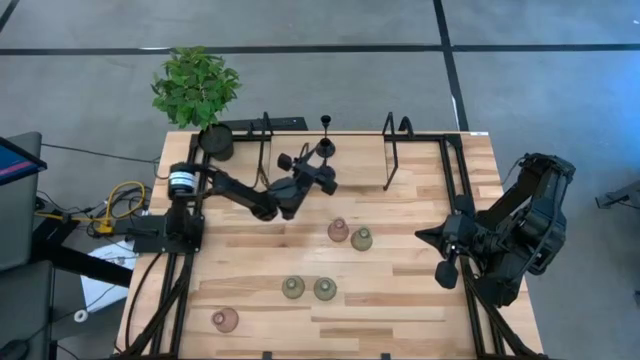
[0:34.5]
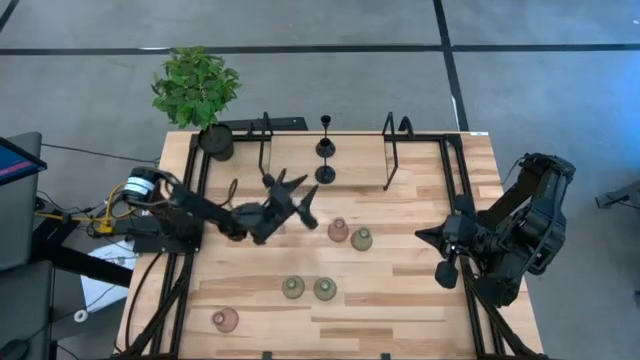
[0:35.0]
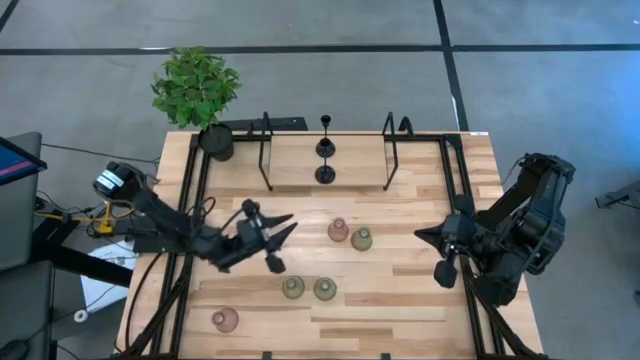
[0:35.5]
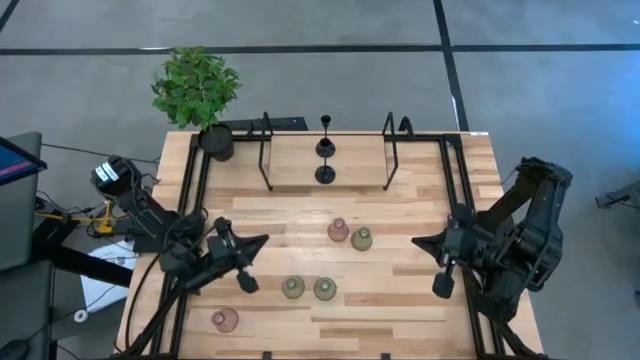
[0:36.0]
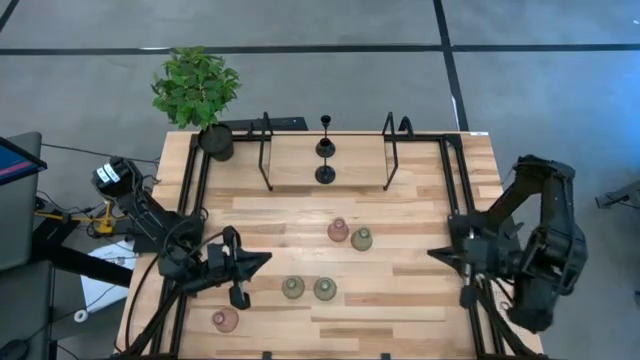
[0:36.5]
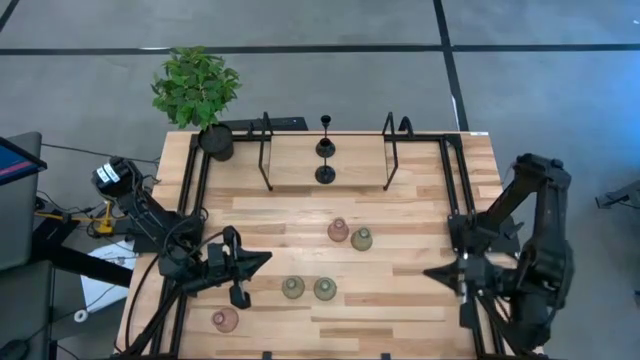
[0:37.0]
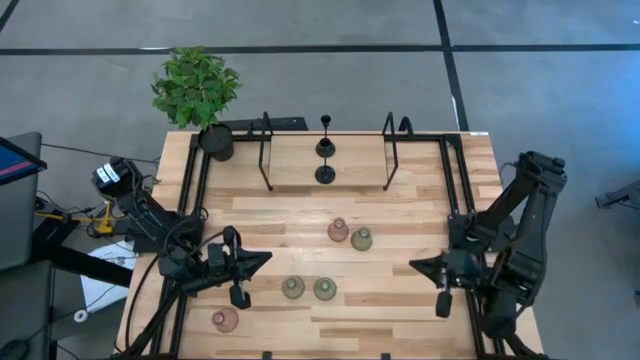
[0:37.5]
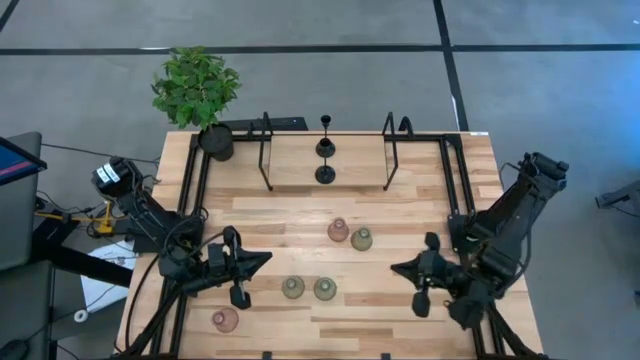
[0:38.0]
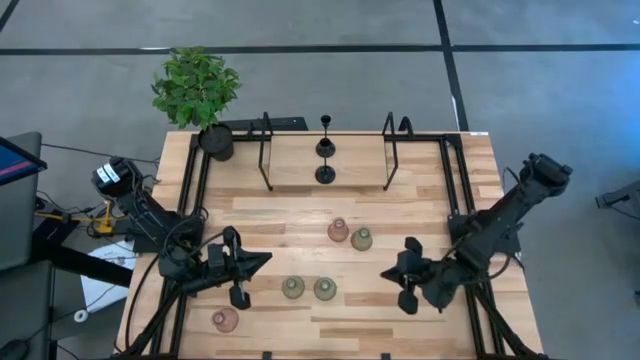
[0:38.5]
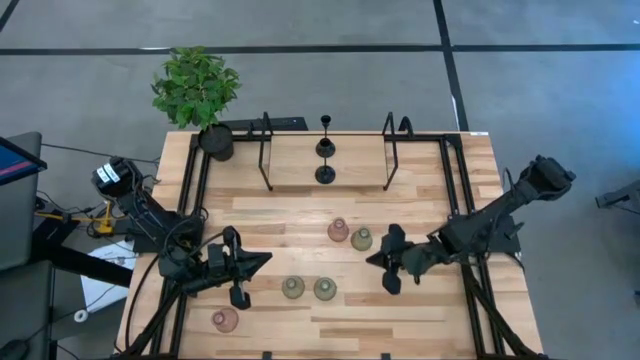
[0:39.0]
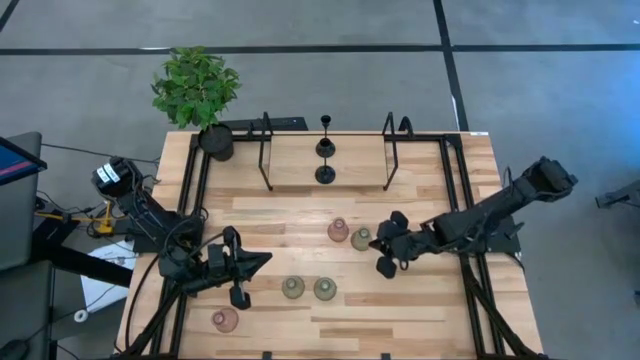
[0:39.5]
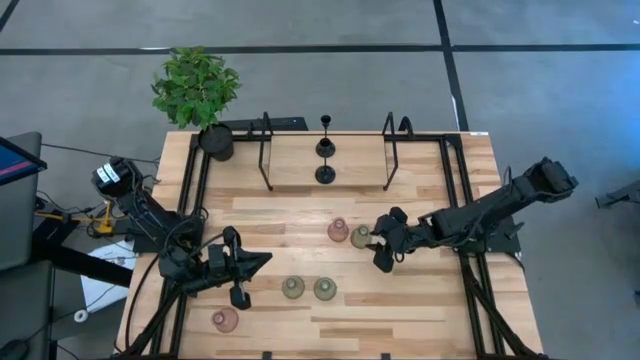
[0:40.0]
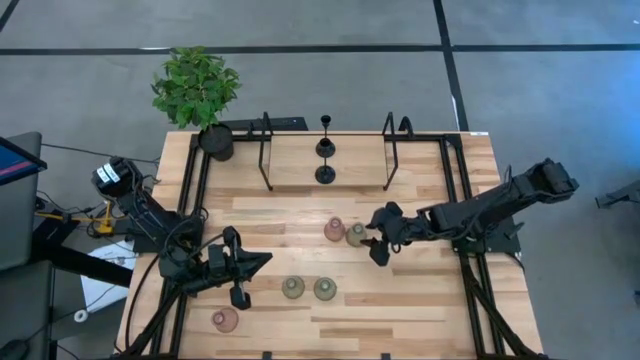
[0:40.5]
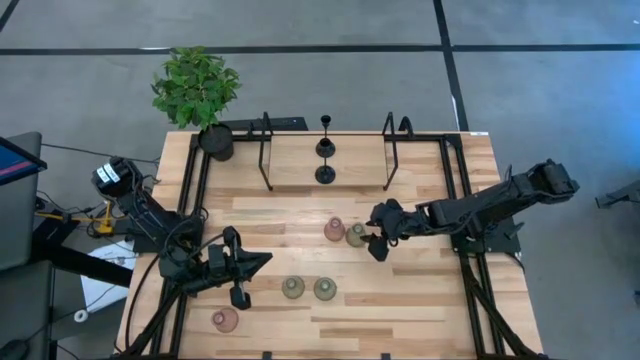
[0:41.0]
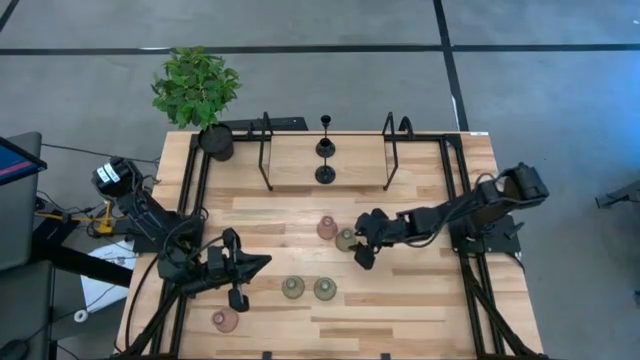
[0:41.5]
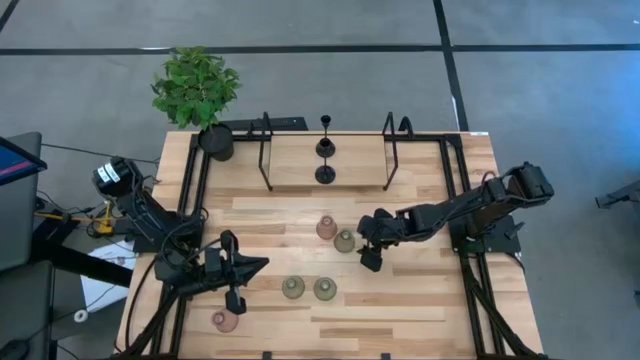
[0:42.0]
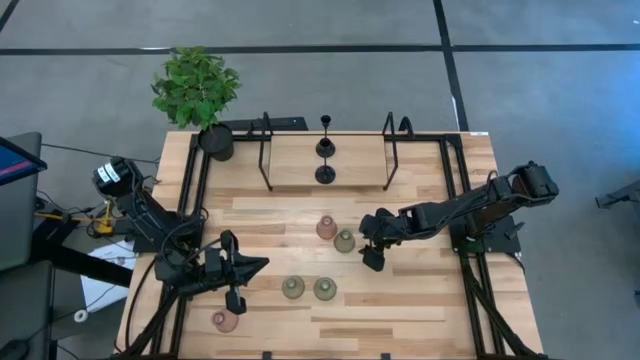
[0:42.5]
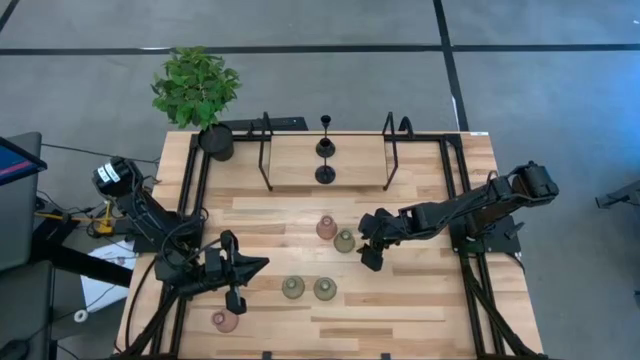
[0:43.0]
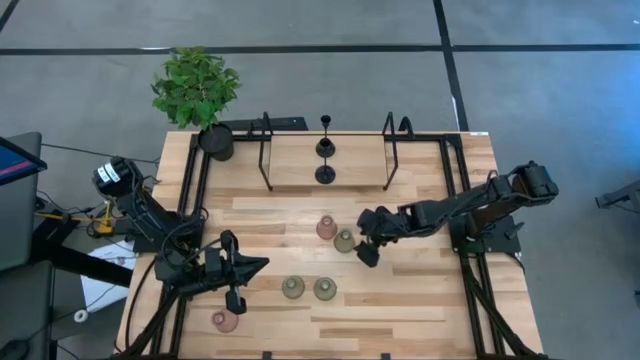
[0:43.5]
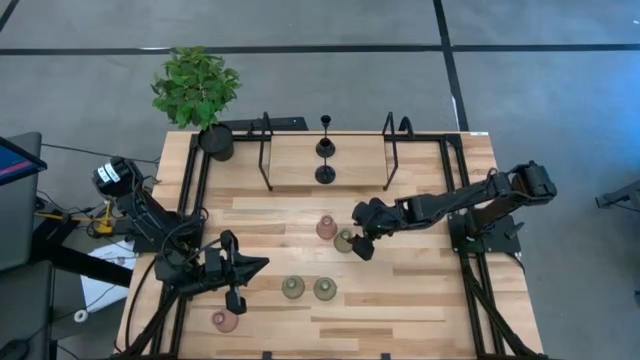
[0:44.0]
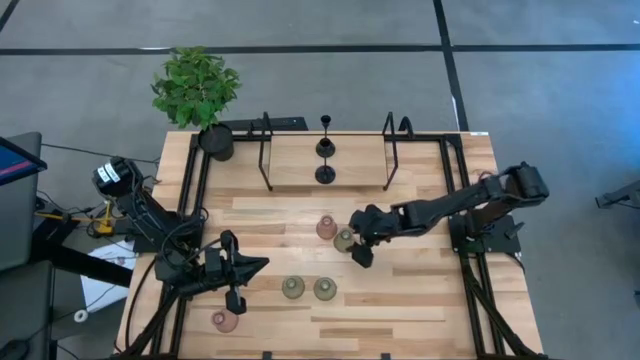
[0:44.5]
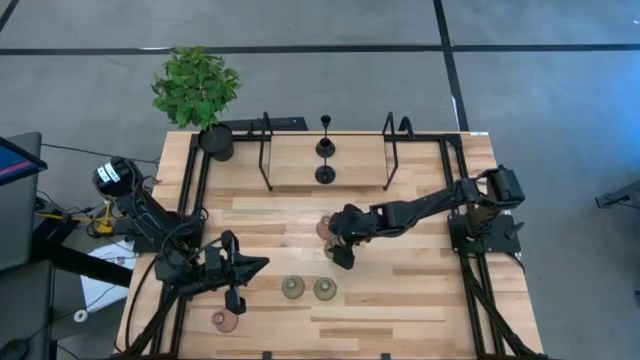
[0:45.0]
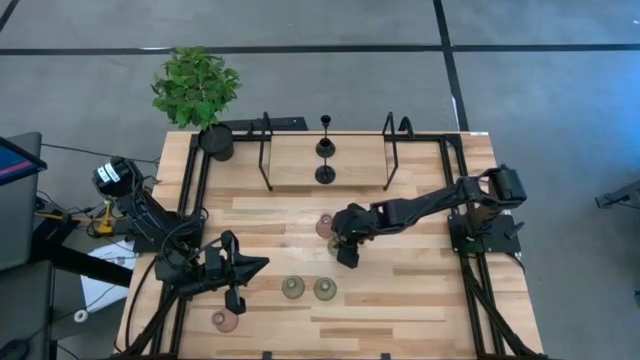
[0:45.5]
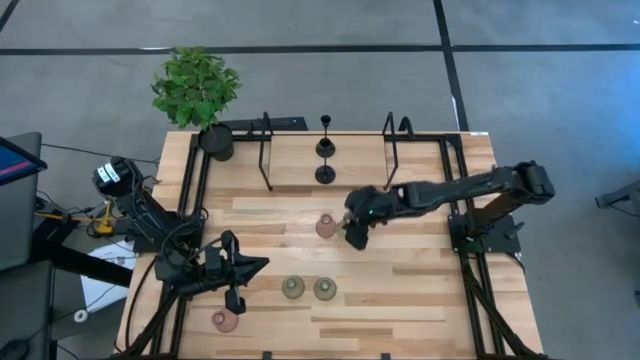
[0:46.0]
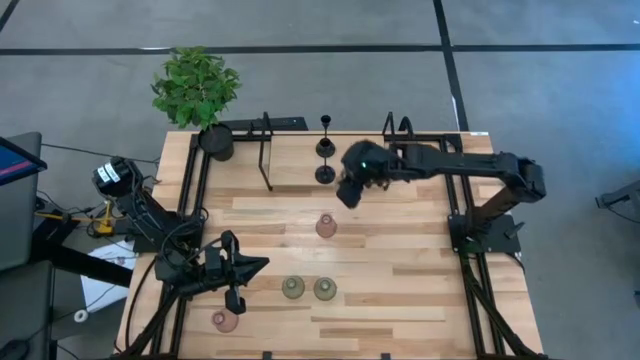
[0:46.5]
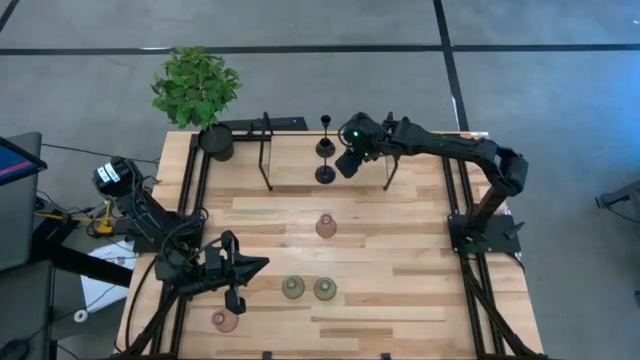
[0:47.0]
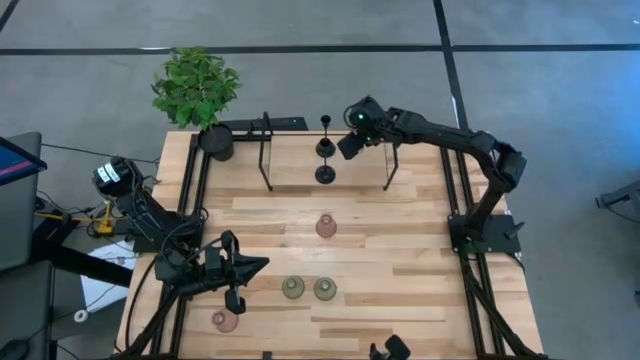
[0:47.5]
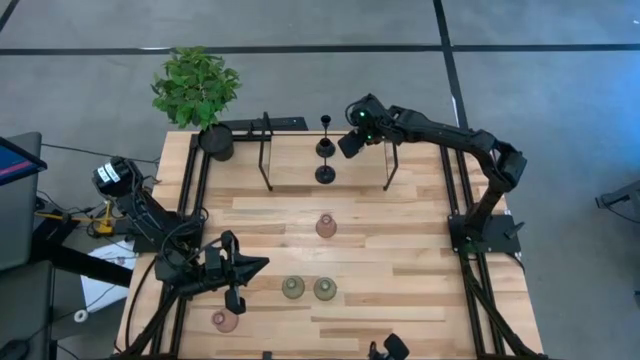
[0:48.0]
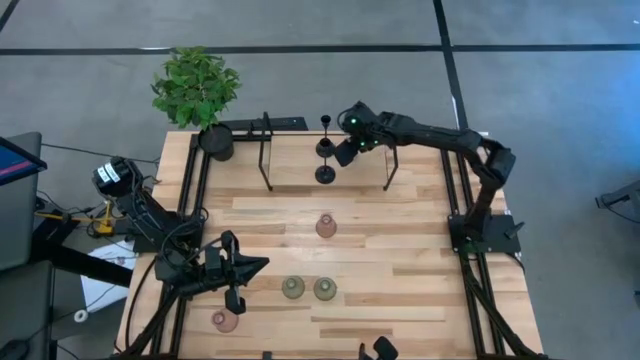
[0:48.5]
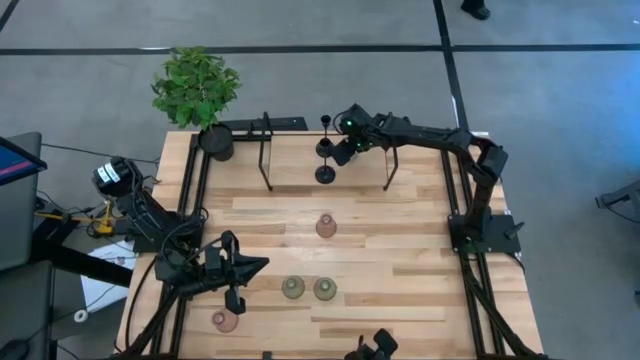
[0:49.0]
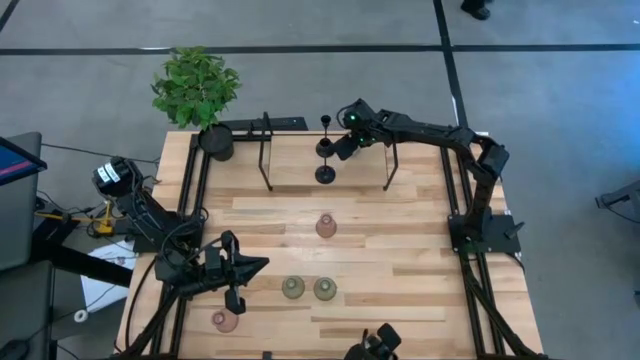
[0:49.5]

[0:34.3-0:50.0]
Task: Pick & Place candle stick holders
Put the green candle holder on the shelf

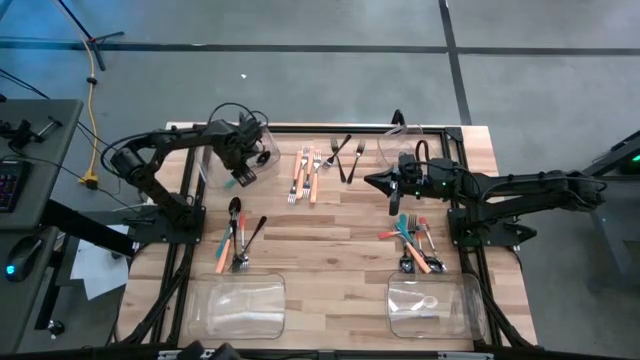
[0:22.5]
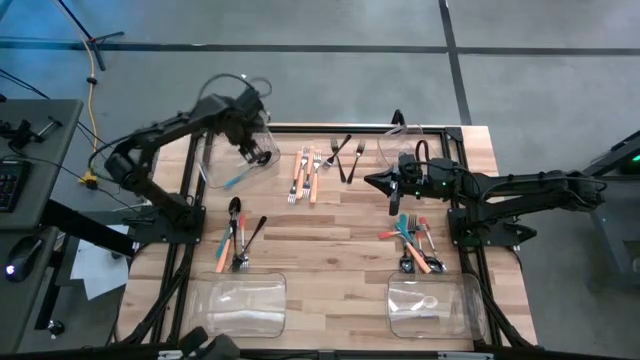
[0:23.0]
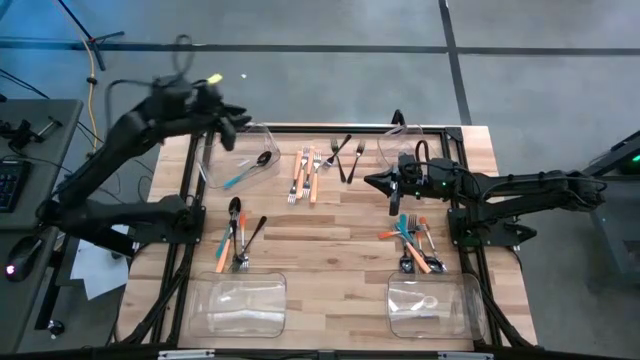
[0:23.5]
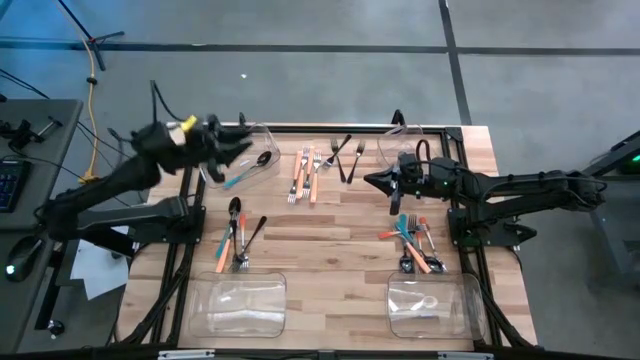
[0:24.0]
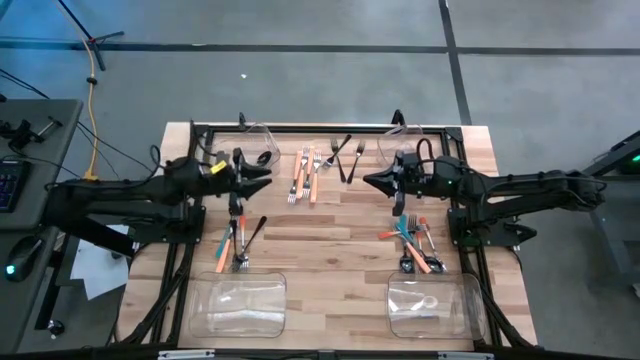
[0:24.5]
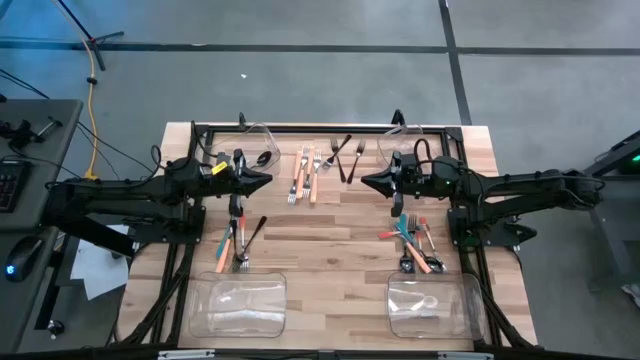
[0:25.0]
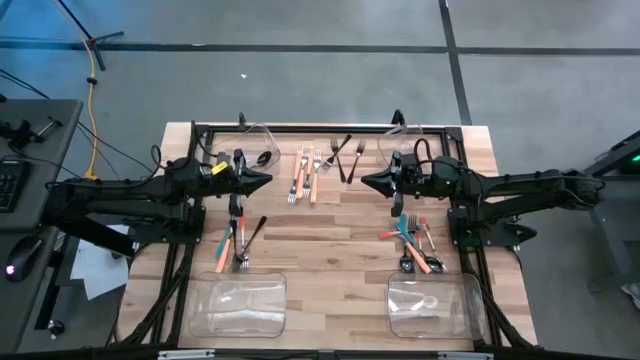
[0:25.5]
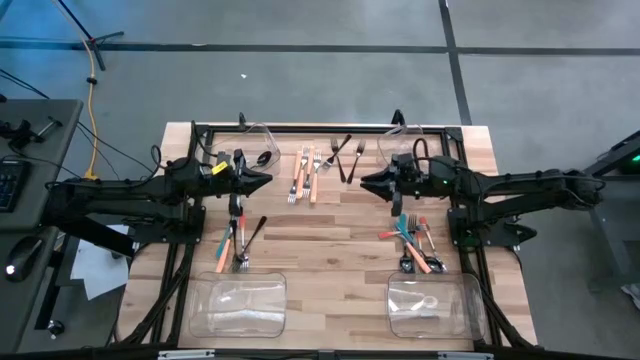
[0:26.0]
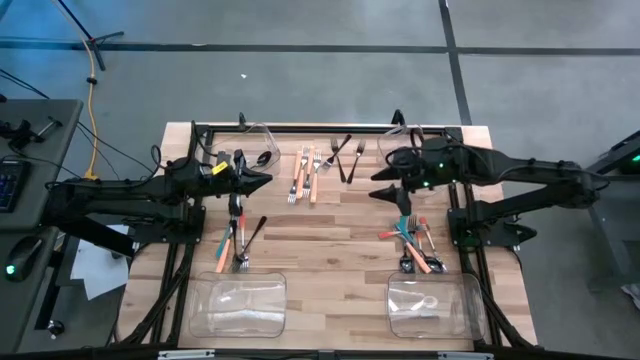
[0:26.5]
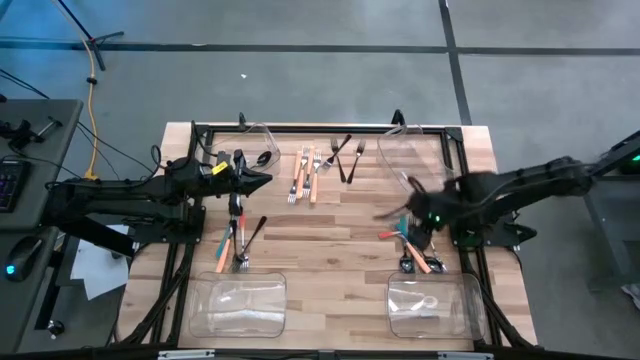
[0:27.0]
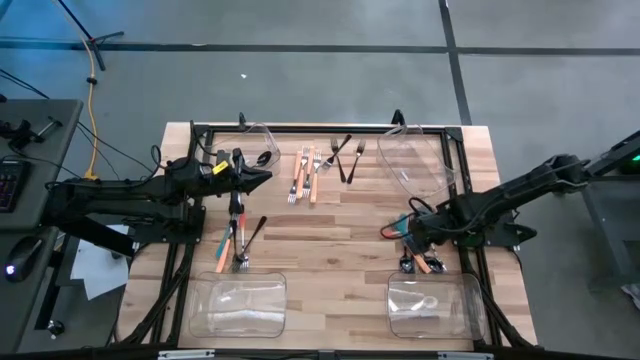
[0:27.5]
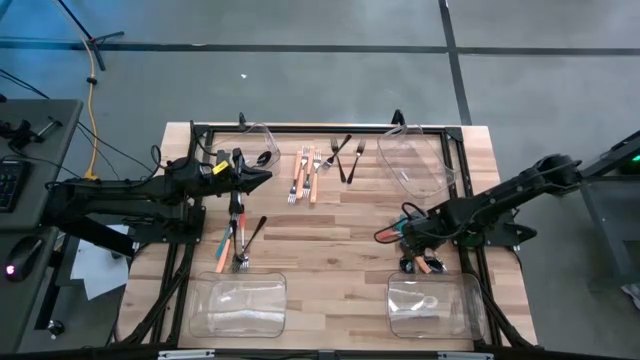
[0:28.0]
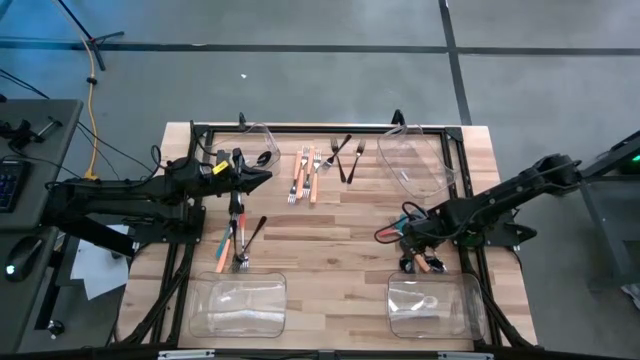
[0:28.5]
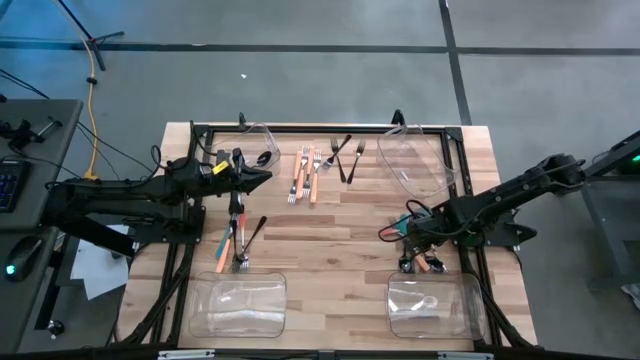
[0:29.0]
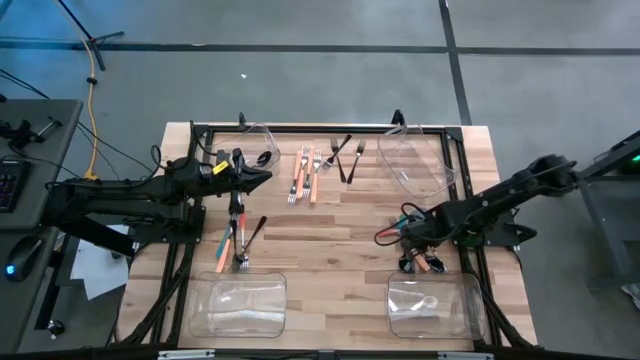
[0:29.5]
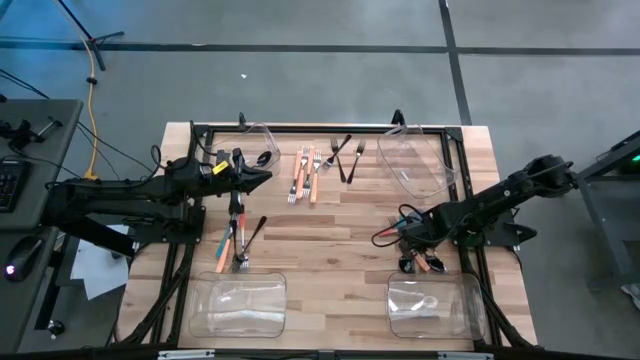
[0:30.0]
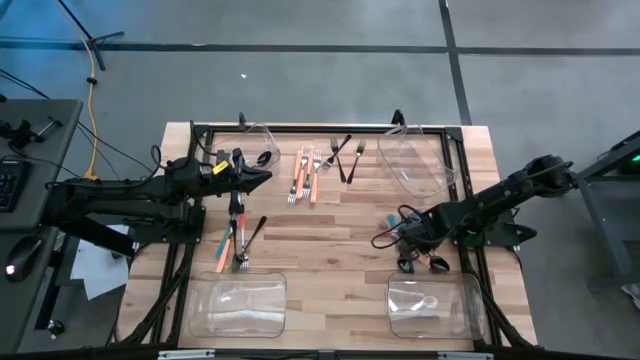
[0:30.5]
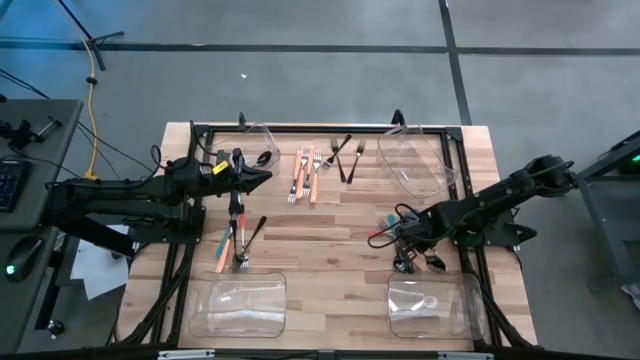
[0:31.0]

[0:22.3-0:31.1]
Task: Sort silverware by color (type)
Put the blue spoon into the top left transparent bin
